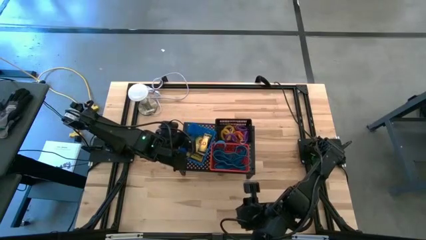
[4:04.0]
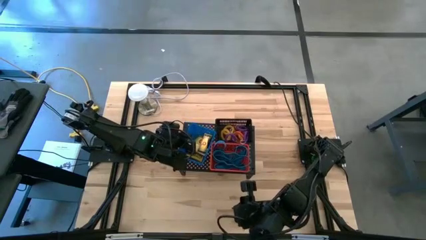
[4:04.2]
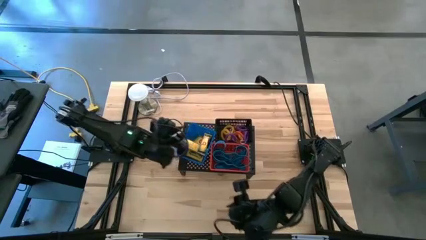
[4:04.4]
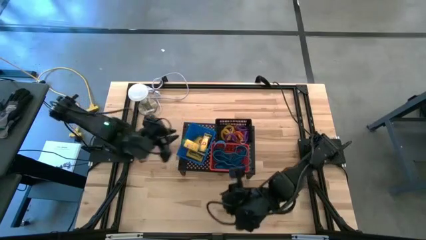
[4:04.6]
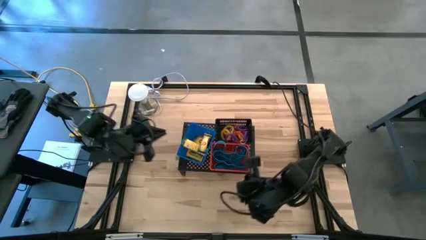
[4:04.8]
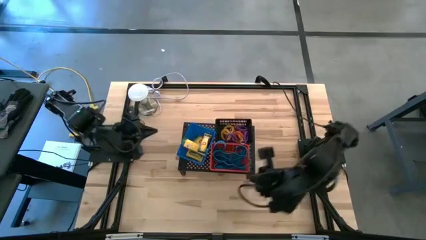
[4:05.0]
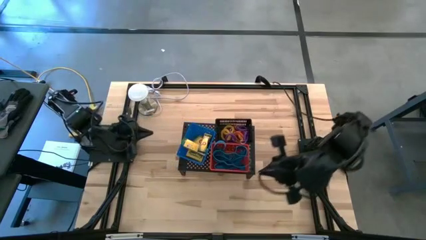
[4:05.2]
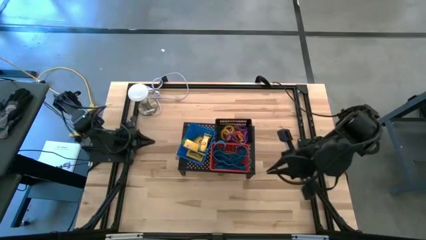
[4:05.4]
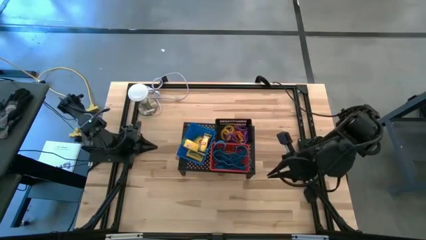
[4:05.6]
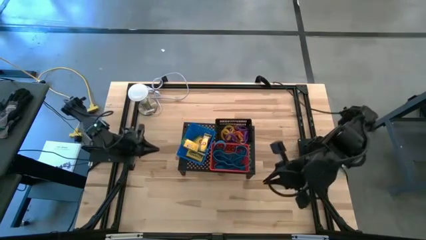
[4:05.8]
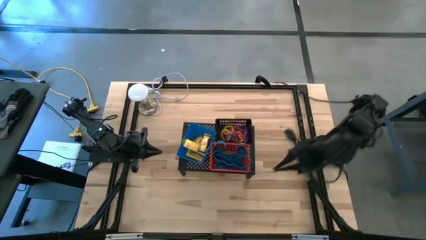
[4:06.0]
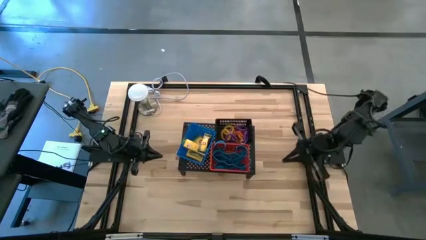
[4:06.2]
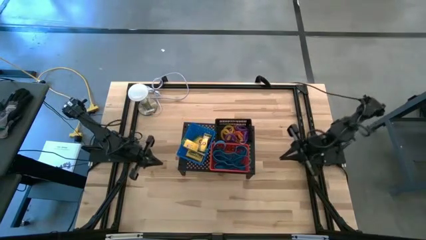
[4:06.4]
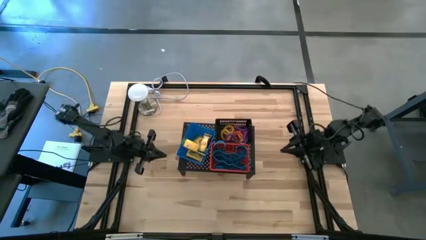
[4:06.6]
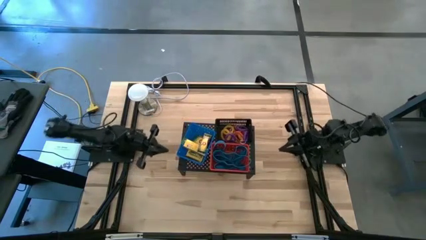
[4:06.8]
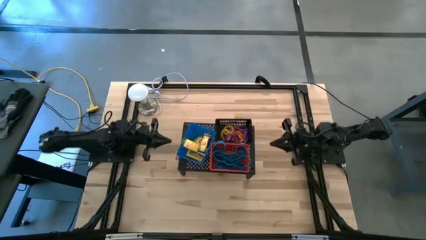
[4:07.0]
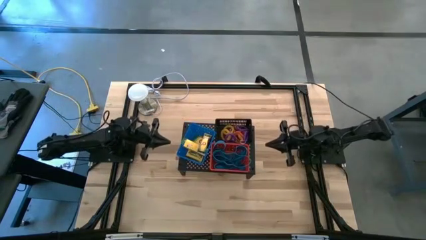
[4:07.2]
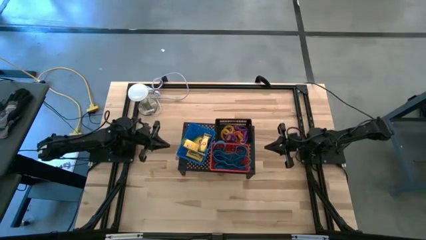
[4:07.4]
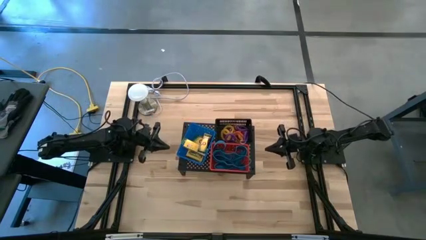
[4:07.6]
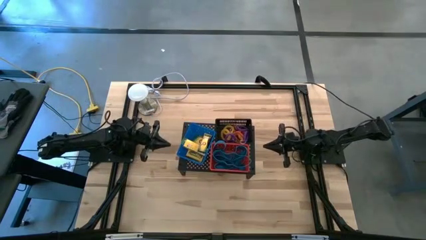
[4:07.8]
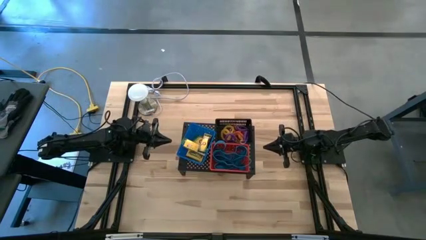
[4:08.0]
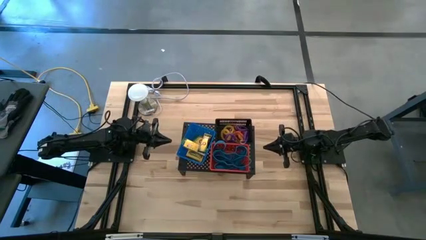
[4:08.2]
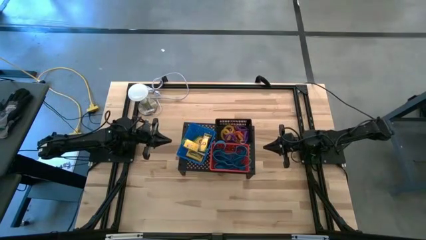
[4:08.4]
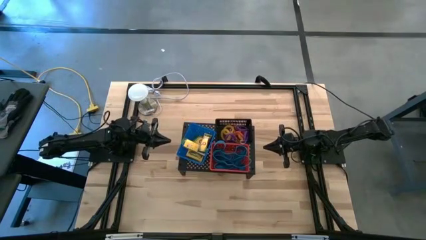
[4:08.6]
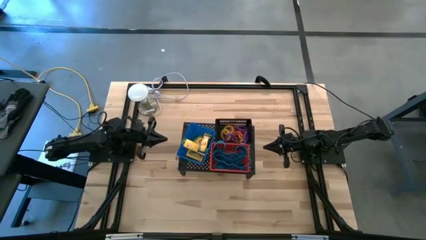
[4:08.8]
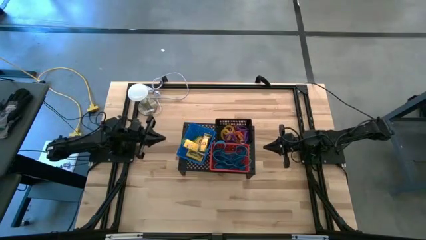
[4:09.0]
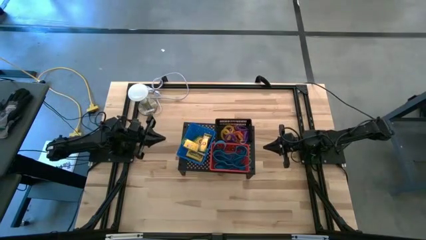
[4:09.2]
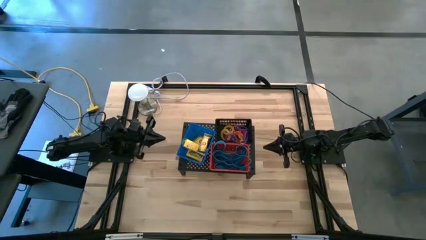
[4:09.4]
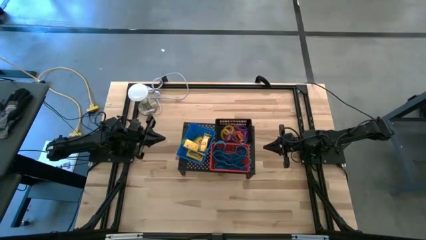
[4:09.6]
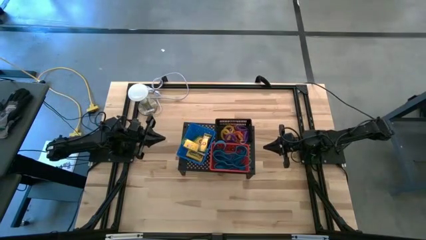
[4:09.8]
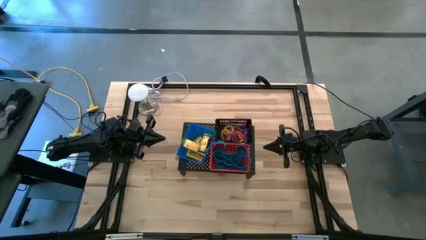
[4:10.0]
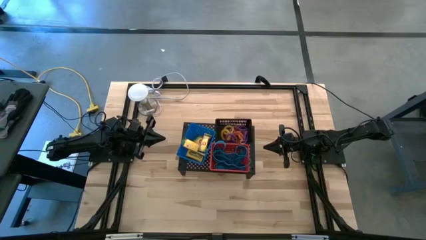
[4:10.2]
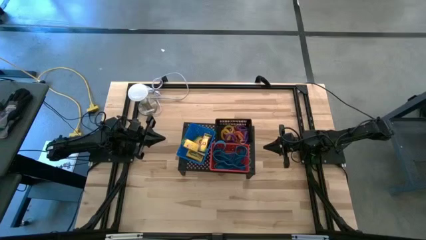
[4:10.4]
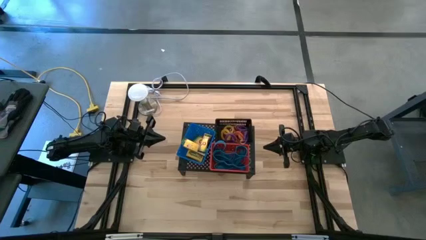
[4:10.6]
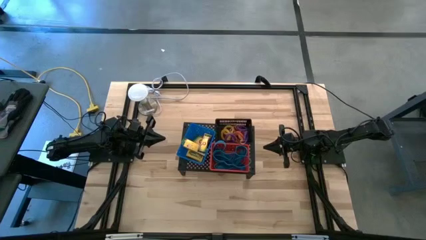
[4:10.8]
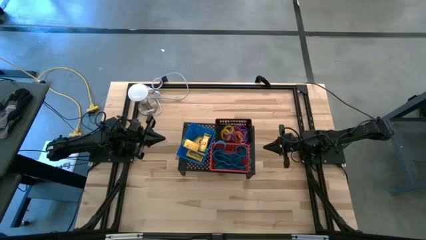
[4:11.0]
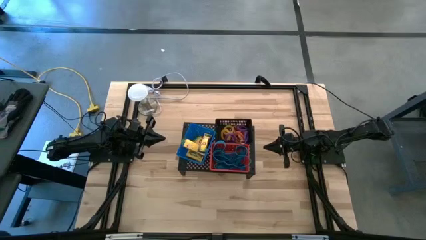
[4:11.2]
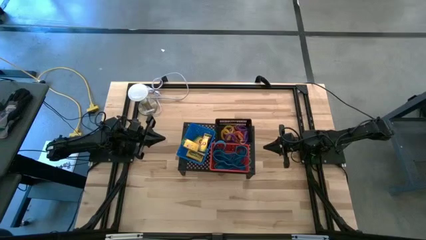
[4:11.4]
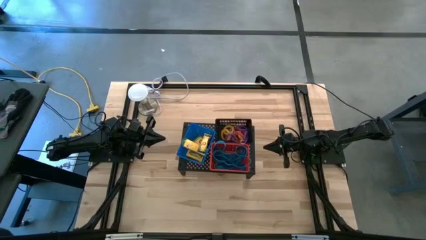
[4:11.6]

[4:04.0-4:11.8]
Task: Pick & Place Office Desk Supplies
Return to Home Position

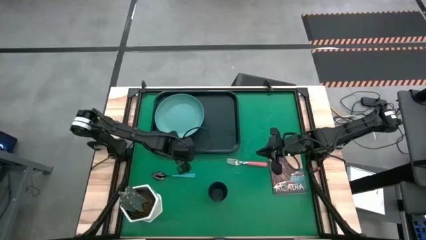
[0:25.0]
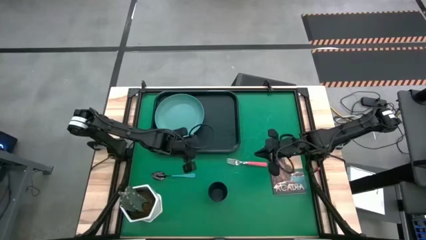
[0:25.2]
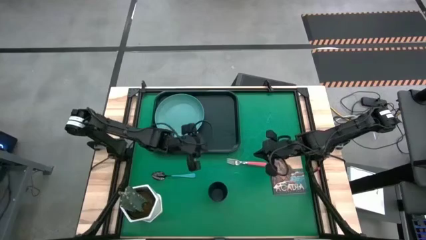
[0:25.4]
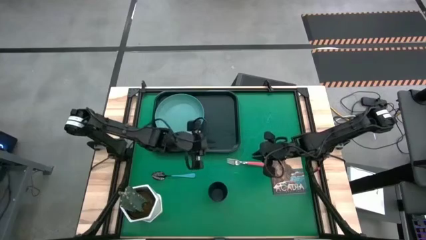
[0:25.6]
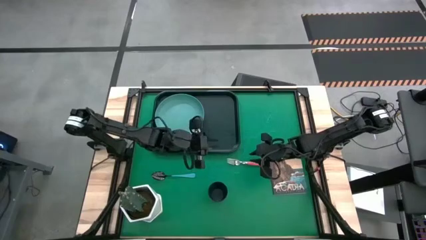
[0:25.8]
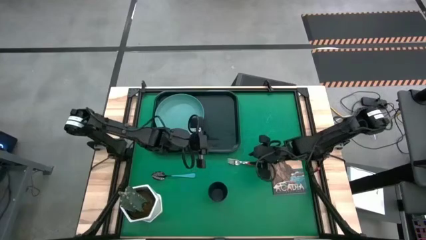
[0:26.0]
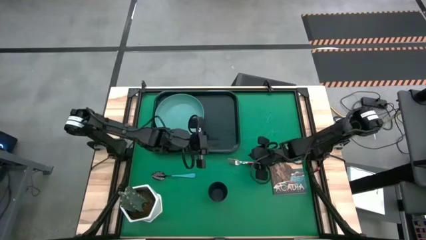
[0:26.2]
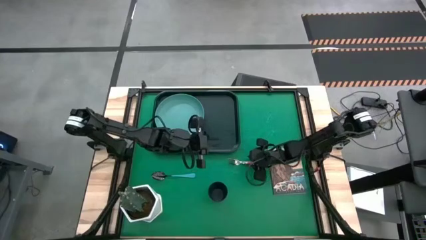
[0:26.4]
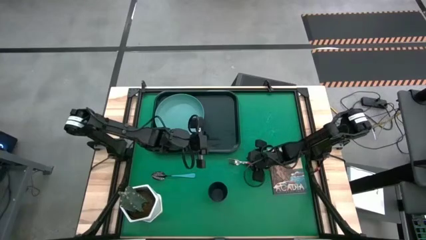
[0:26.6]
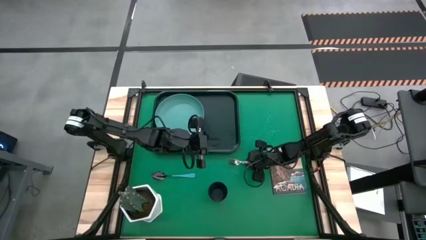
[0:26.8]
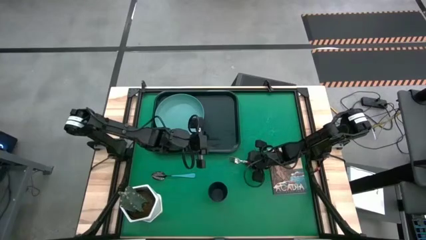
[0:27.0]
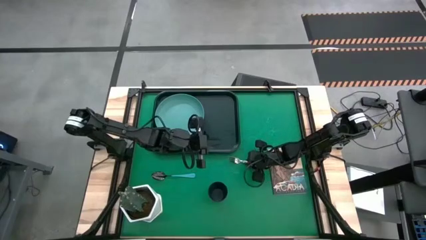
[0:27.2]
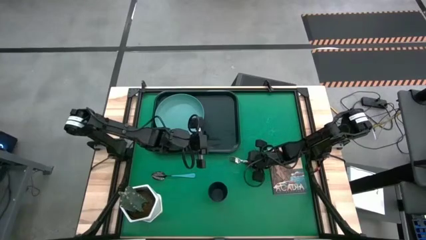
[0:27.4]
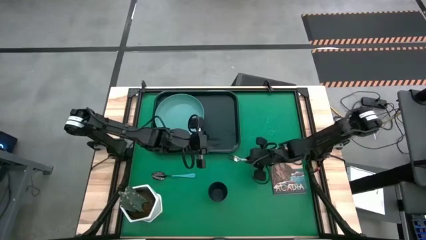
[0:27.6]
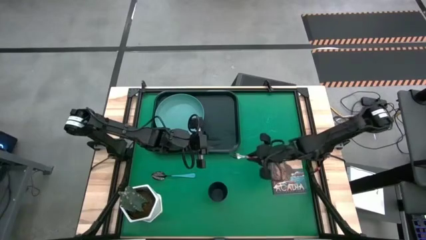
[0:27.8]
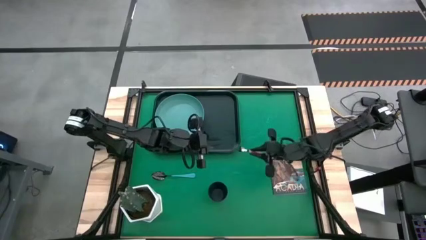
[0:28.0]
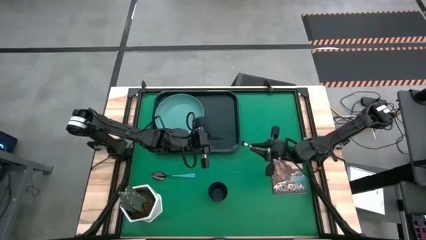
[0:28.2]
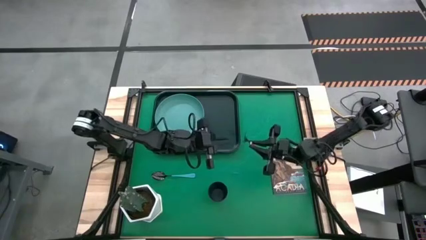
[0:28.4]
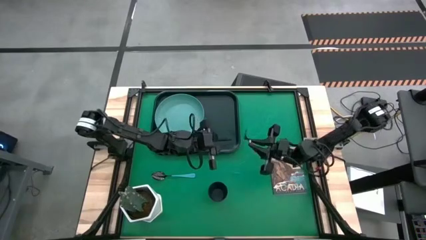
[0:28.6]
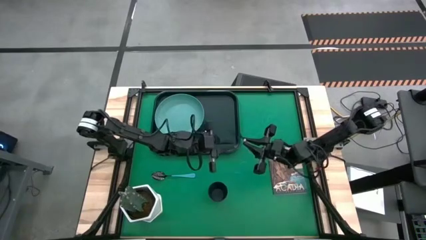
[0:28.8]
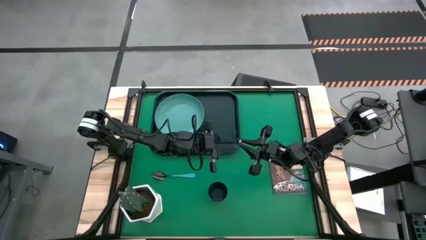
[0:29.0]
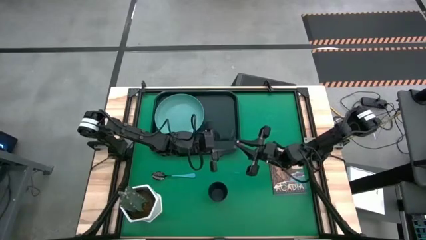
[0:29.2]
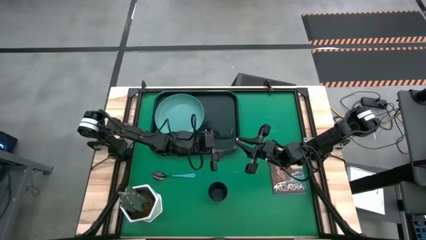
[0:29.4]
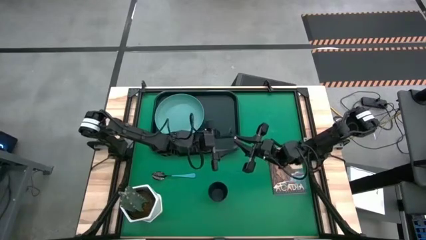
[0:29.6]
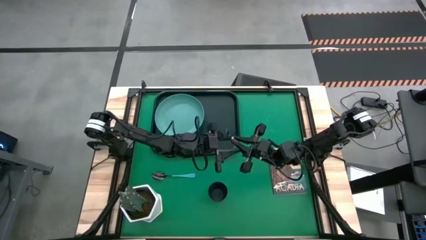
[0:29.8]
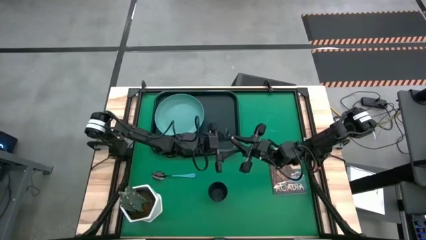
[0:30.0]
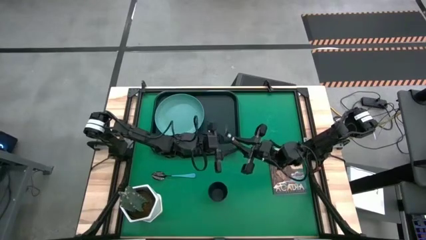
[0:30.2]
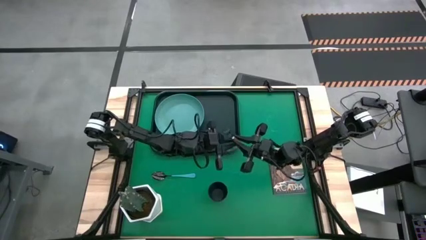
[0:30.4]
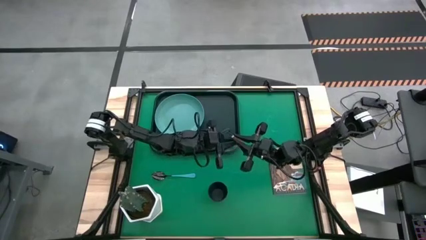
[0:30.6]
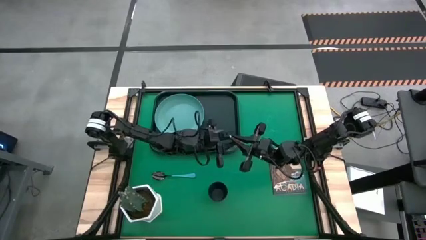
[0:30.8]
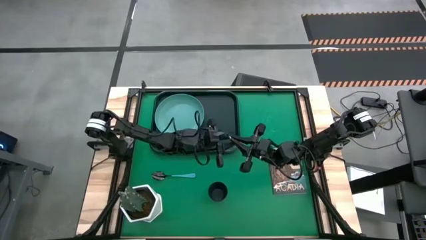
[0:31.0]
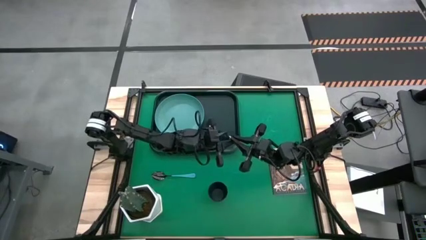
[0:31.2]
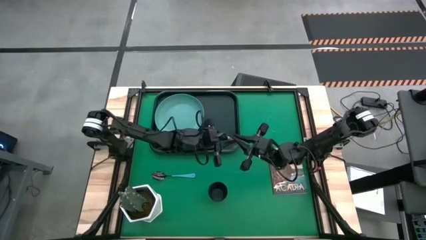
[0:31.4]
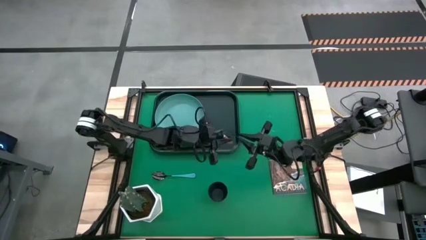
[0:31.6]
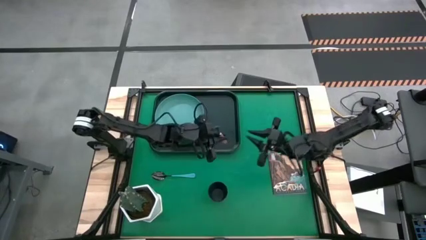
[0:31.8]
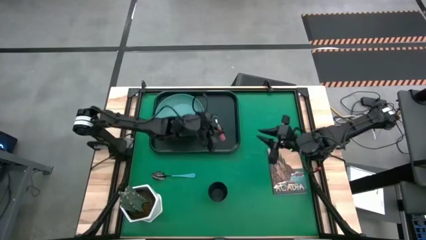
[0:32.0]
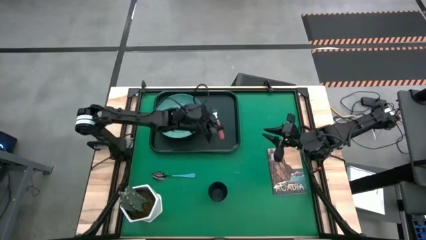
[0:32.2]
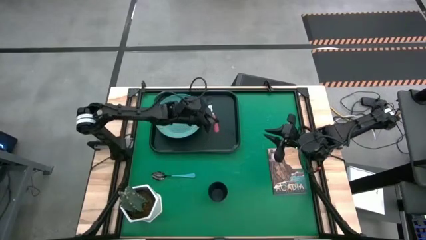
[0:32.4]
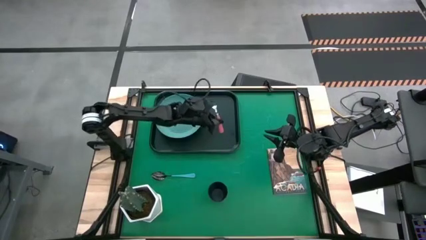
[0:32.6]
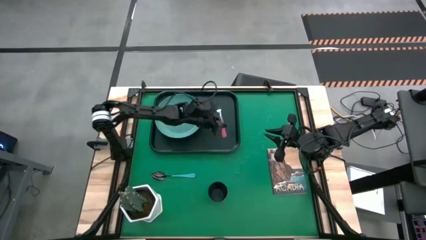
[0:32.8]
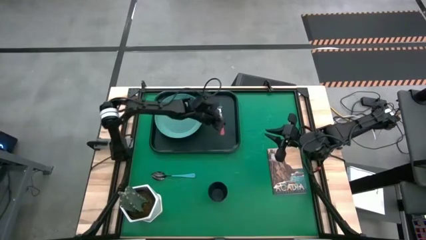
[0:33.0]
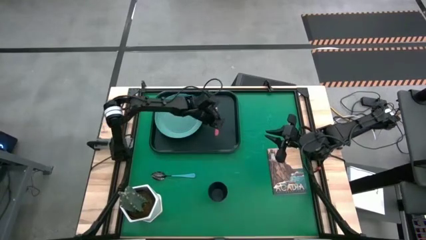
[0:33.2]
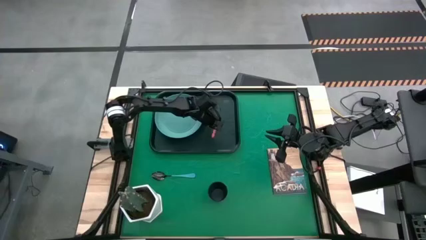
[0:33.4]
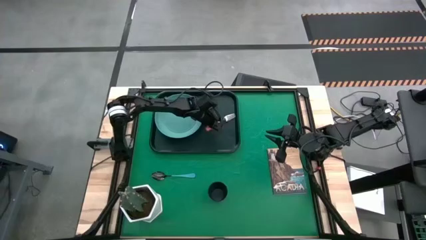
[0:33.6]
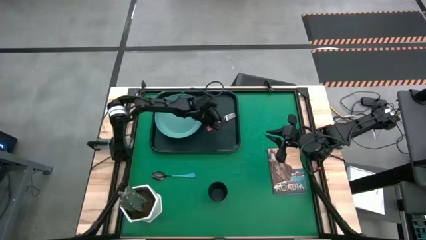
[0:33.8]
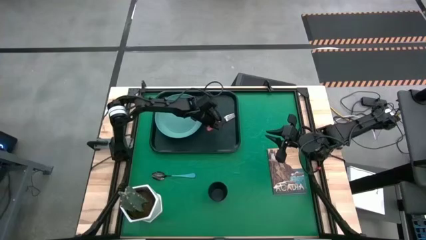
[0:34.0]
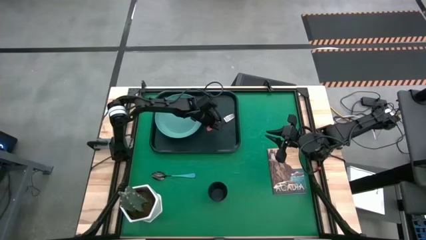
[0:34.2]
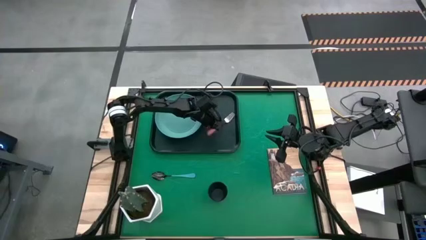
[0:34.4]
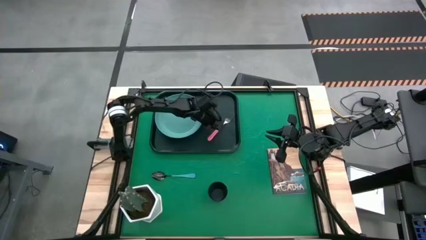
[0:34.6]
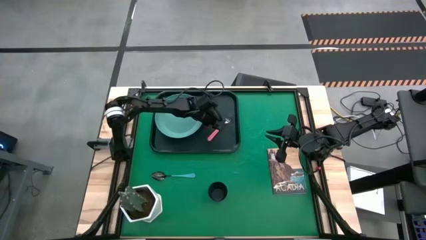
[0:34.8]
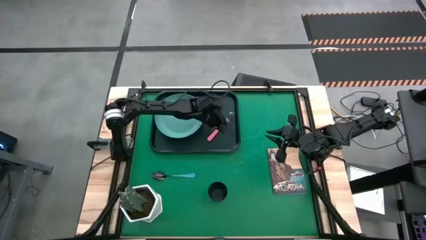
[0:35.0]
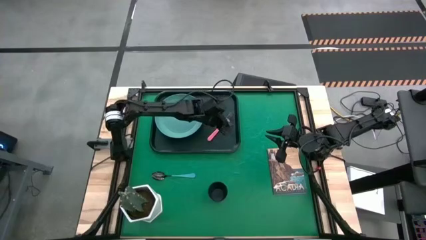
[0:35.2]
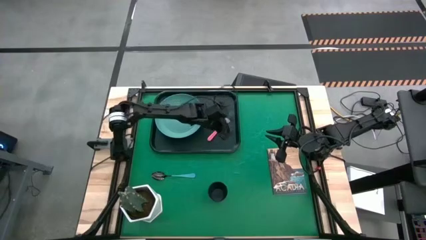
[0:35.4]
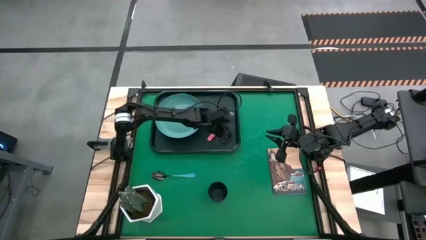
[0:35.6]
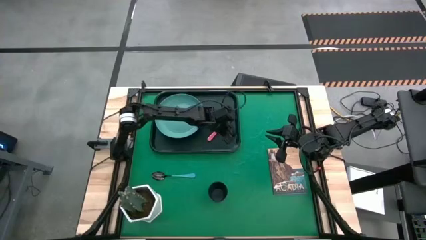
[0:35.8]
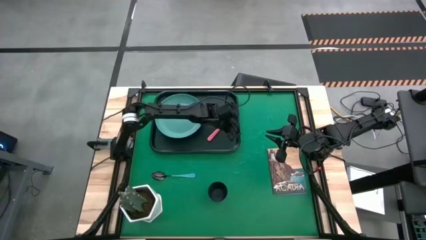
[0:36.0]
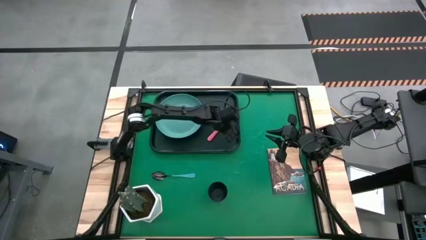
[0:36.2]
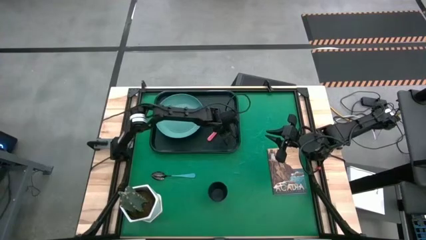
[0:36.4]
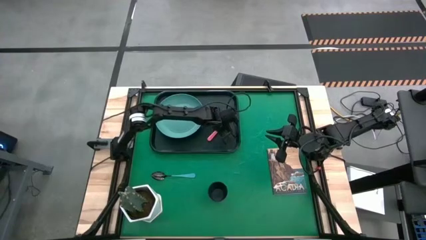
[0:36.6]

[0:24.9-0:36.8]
Task: Pick and place plate/cup/fork/spoon on tray
Put the pink fork on the black tray
